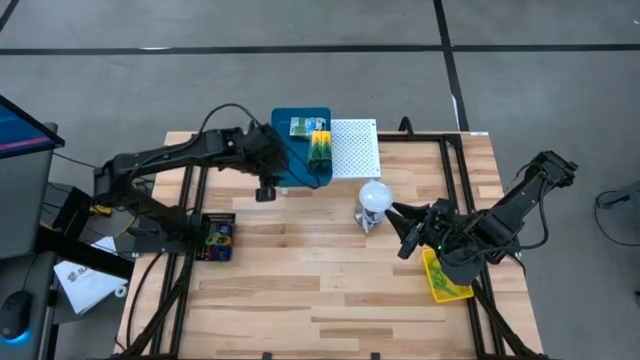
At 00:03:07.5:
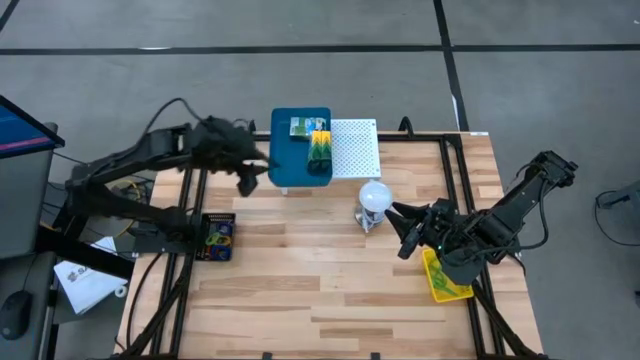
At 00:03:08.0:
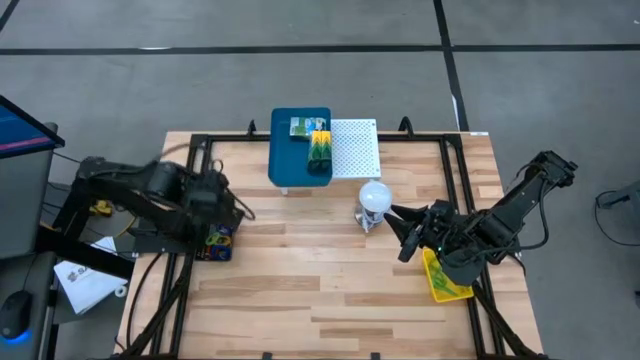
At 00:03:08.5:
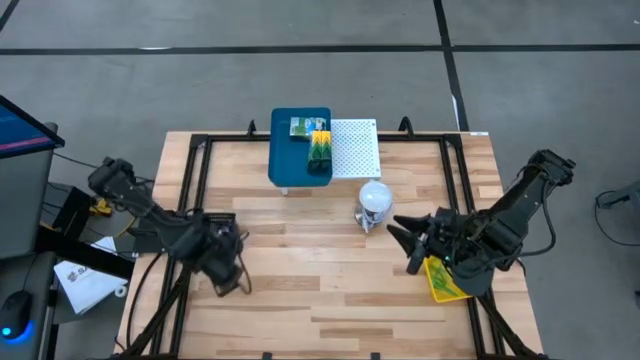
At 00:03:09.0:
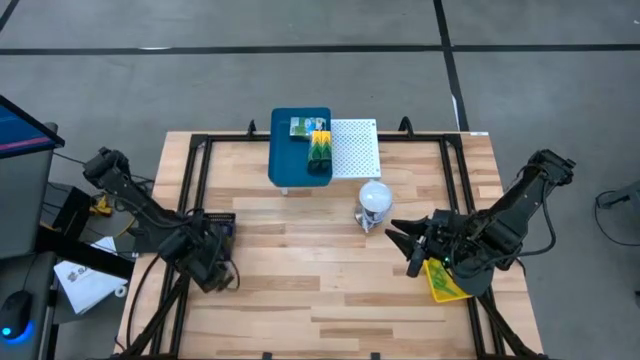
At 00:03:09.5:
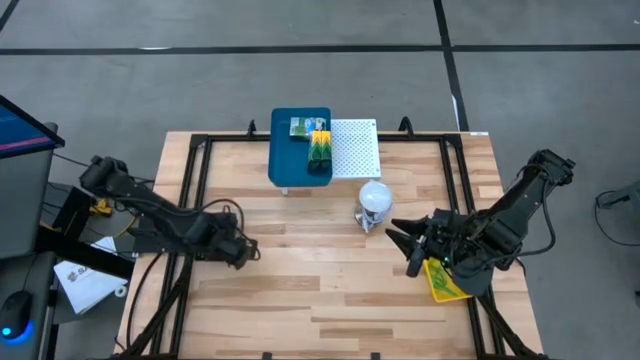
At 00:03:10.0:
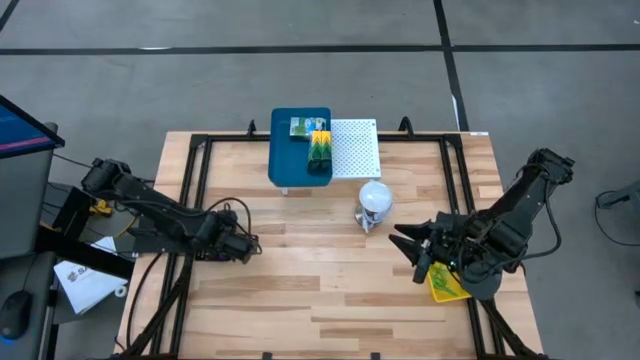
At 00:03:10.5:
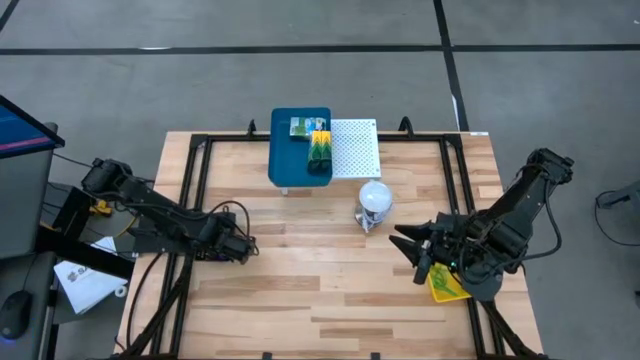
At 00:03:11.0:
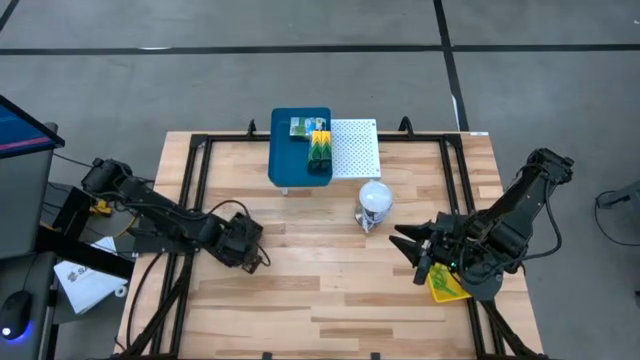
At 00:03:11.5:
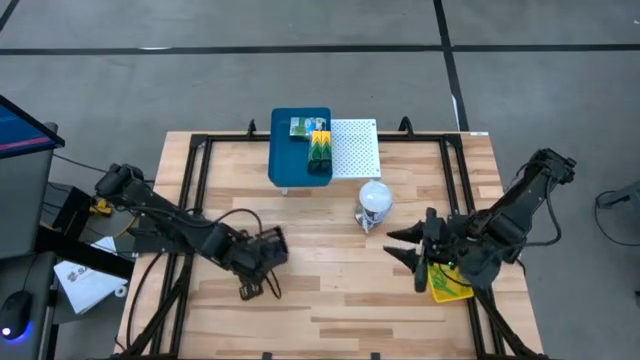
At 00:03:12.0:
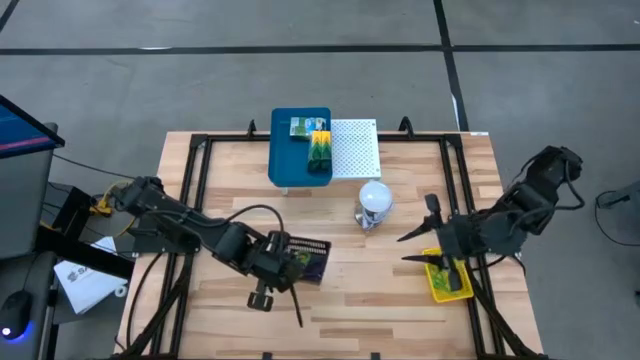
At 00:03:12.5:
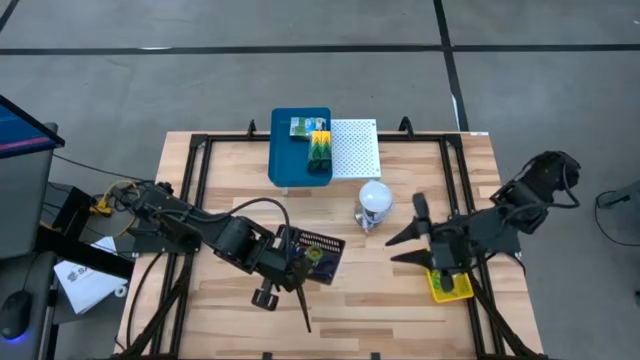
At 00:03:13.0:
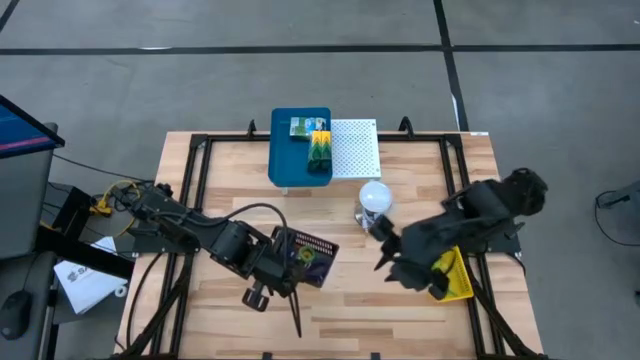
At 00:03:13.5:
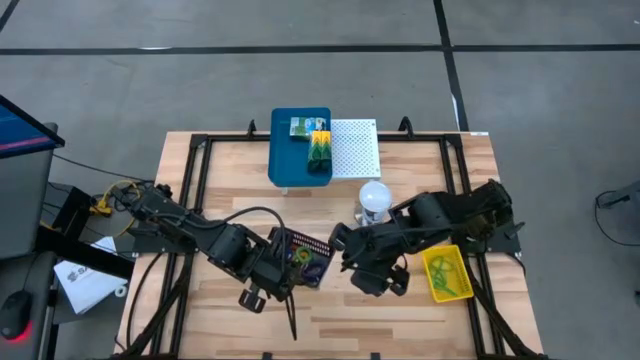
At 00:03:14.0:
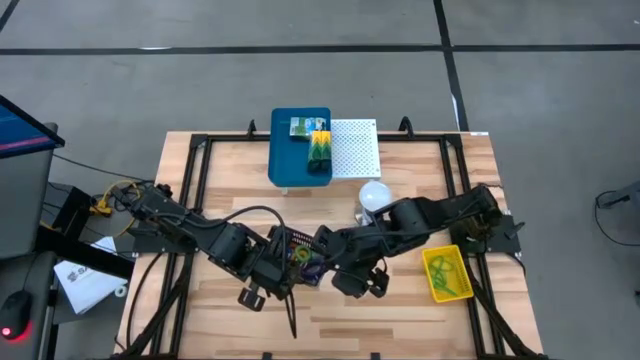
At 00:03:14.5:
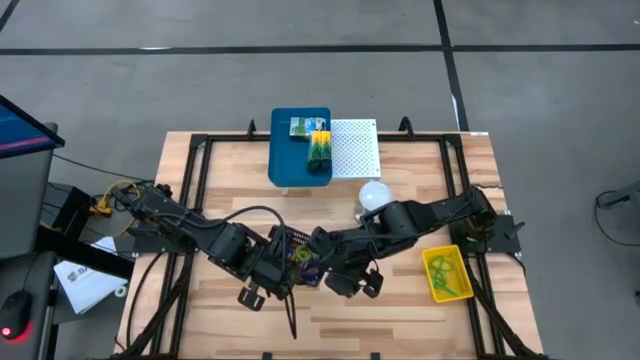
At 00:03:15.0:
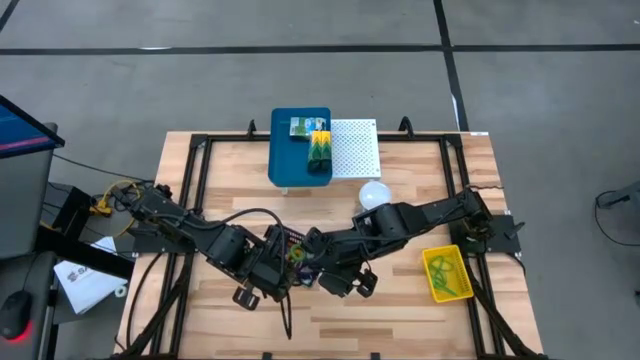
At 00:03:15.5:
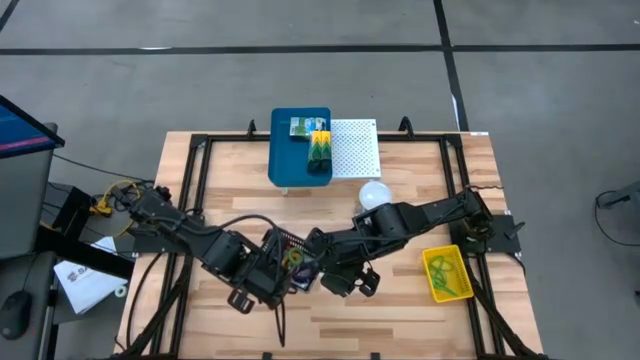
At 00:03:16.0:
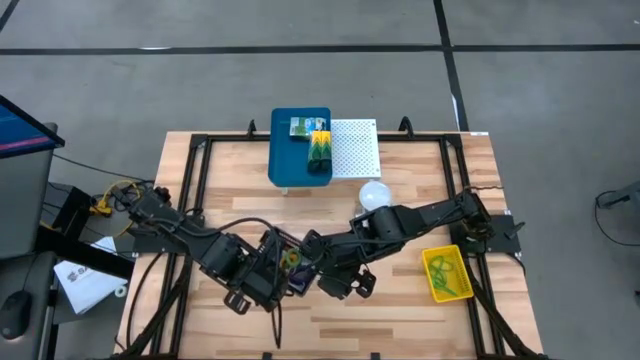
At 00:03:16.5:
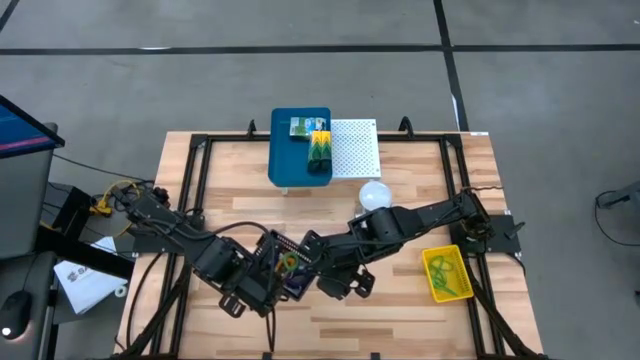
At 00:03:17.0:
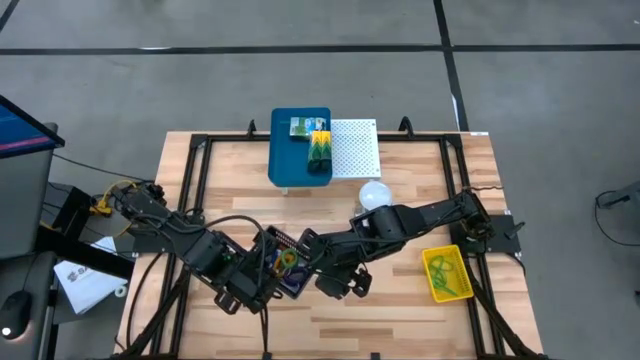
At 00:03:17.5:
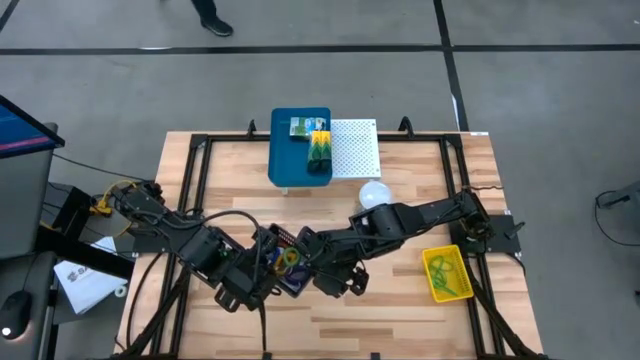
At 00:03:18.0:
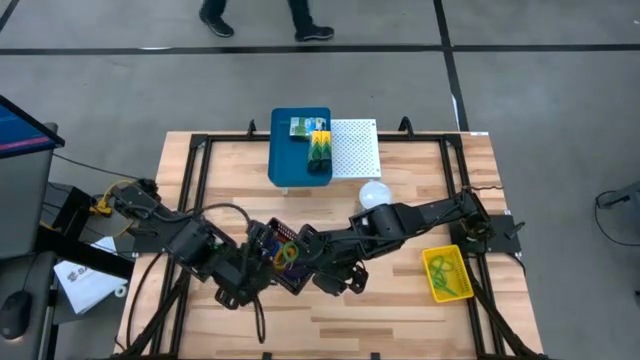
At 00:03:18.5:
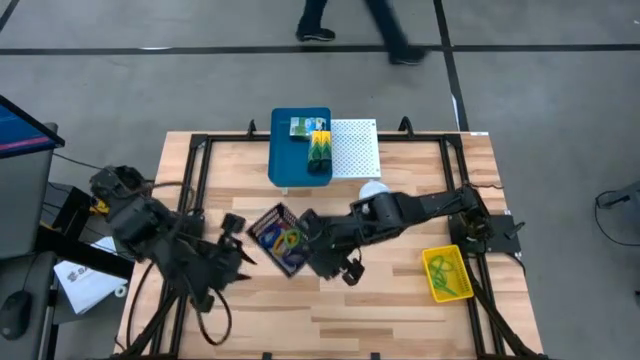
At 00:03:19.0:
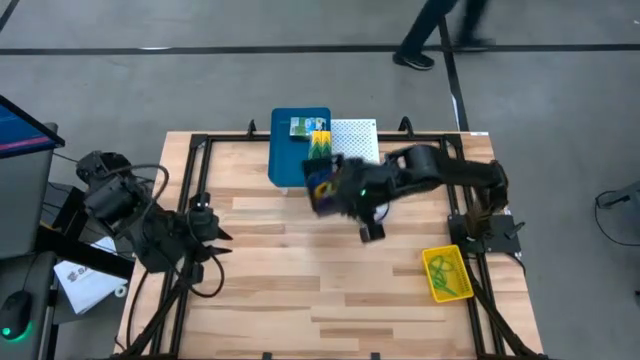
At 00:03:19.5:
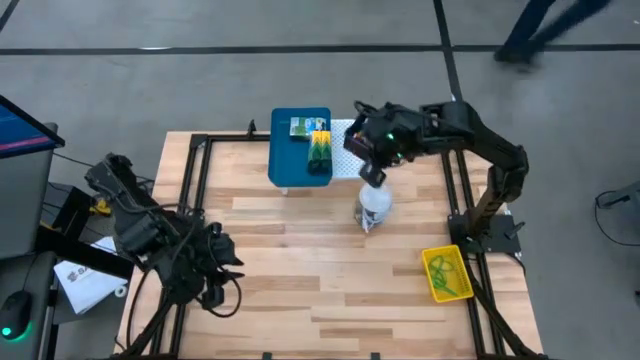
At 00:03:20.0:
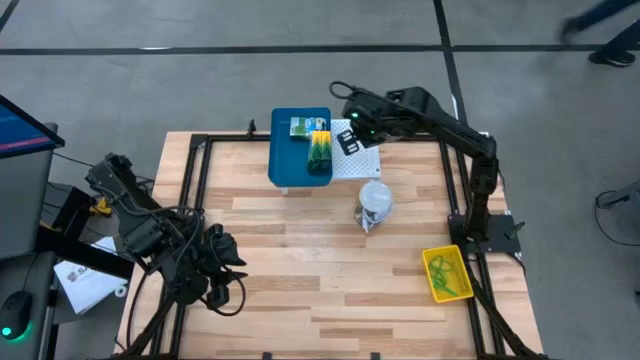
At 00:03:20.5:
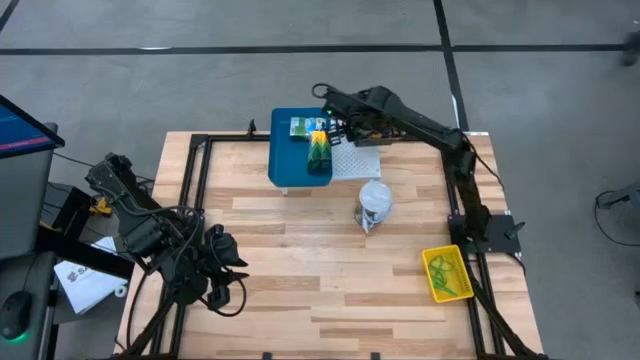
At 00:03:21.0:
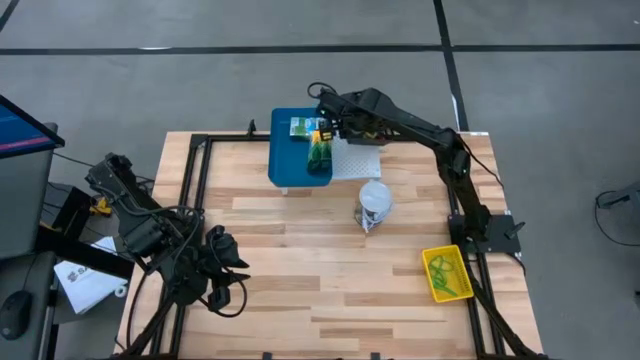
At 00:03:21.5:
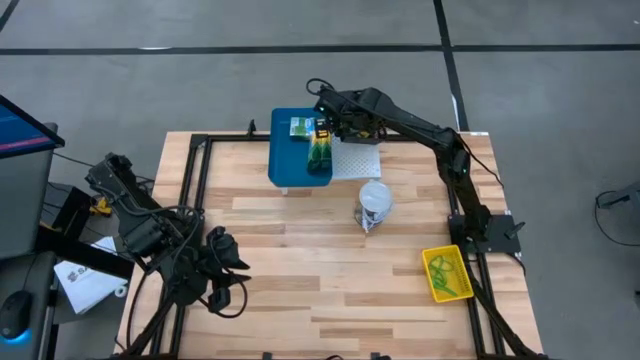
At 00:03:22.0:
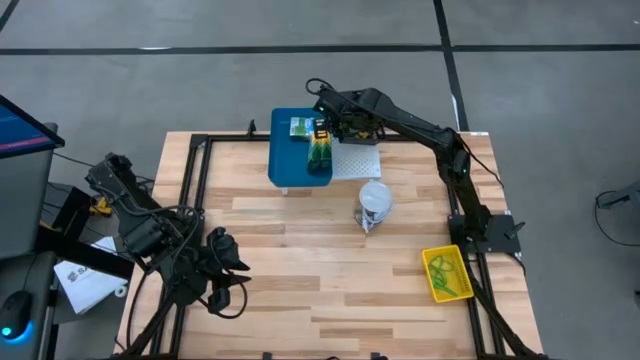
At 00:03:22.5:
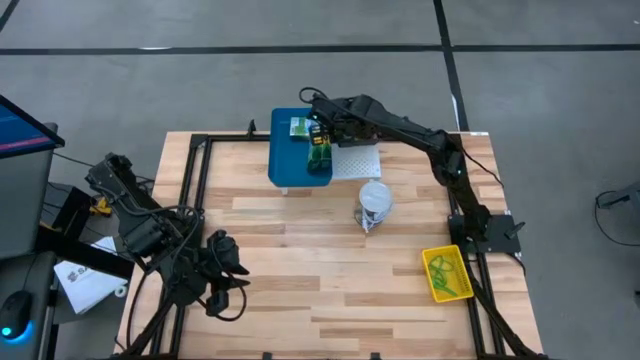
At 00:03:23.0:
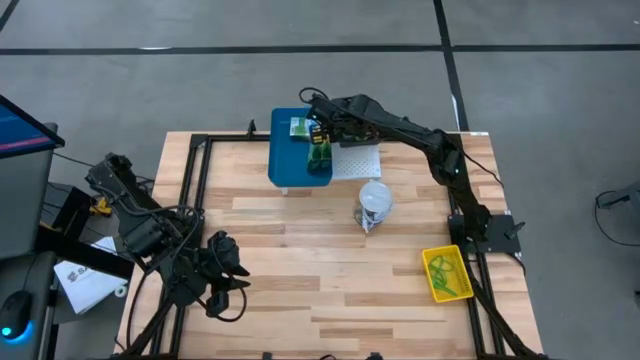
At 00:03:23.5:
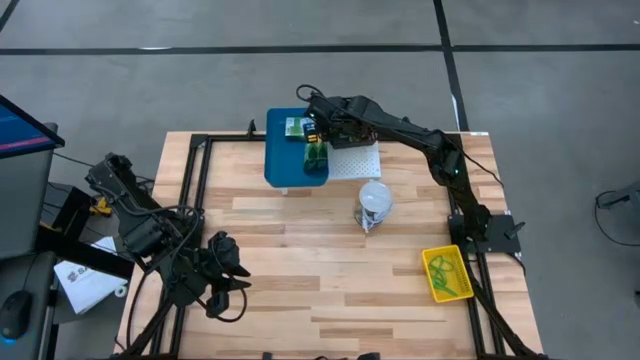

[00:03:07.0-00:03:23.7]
Task: Pick & Place Office Desk Supplies
Put the black bin with spring keychains on the shelf

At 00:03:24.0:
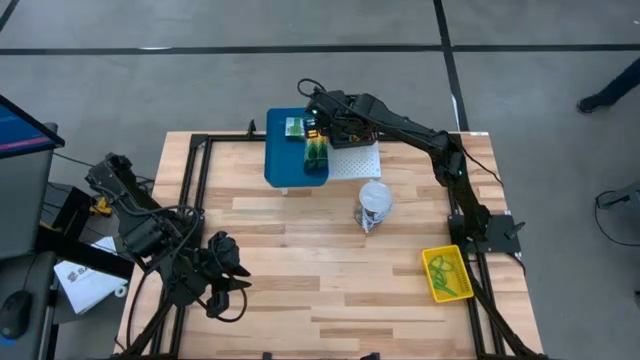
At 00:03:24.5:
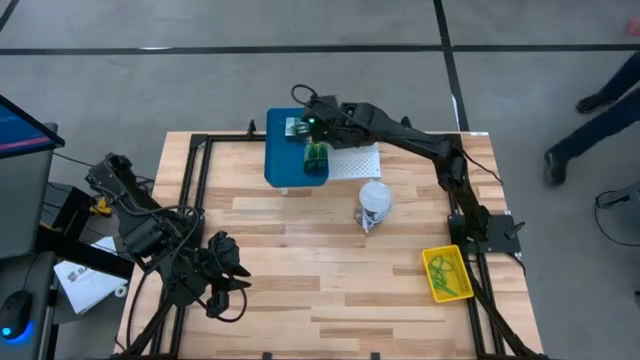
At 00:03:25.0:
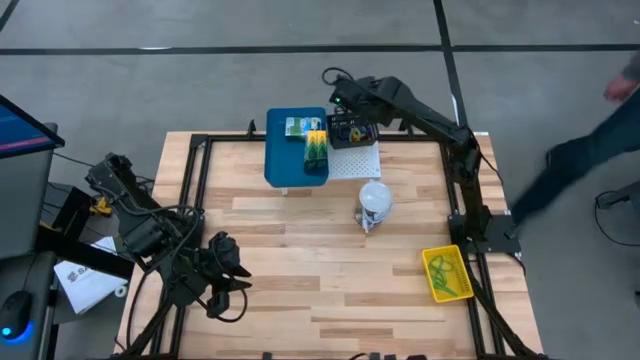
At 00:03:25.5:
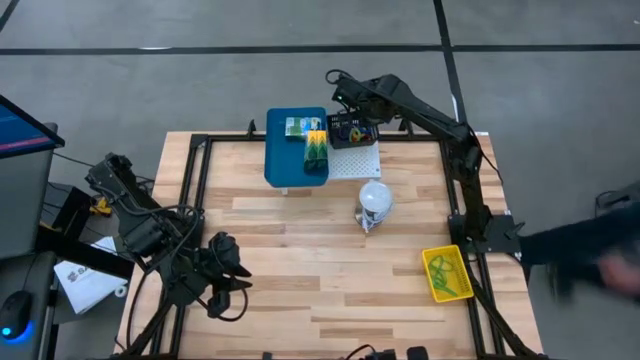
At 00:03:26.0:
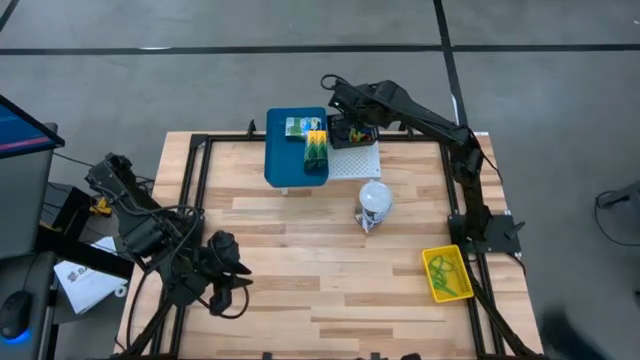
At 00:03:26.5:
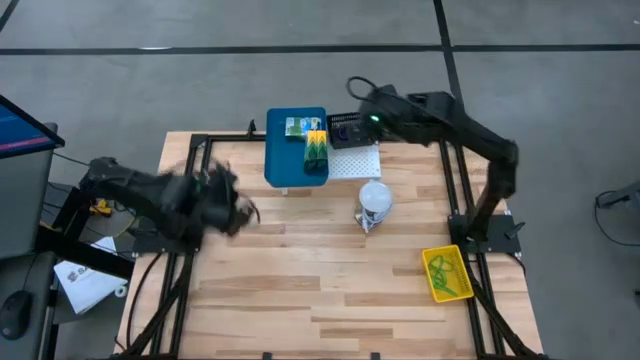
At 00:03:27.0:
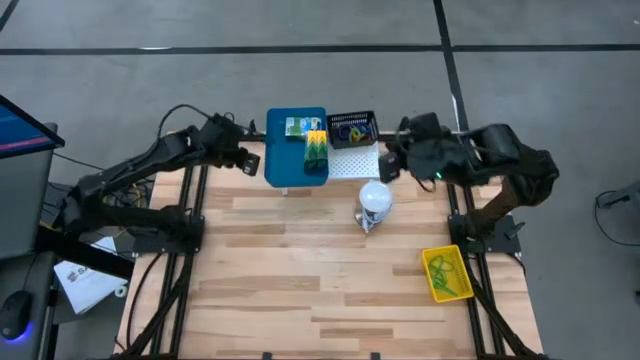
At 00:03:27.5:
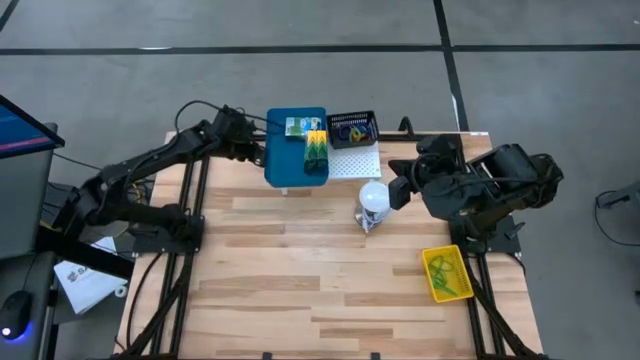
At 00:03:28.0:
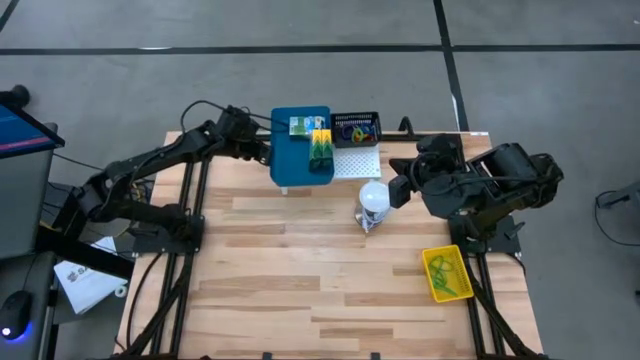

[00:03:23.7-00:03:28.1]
Adjust the blue bin
